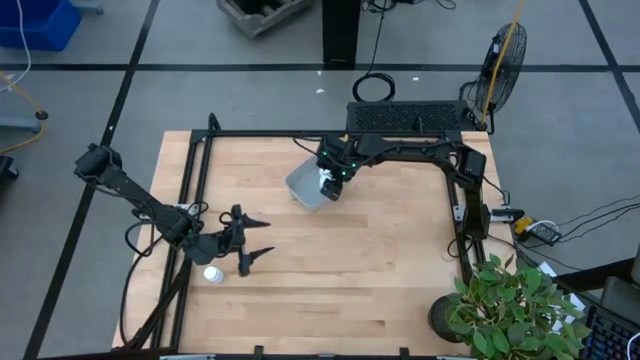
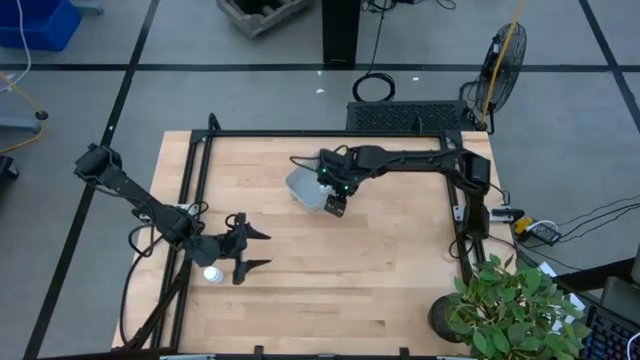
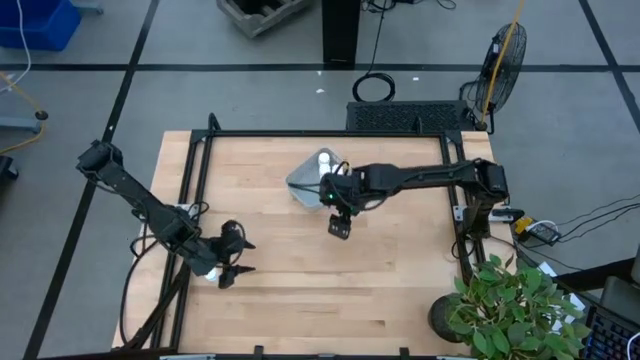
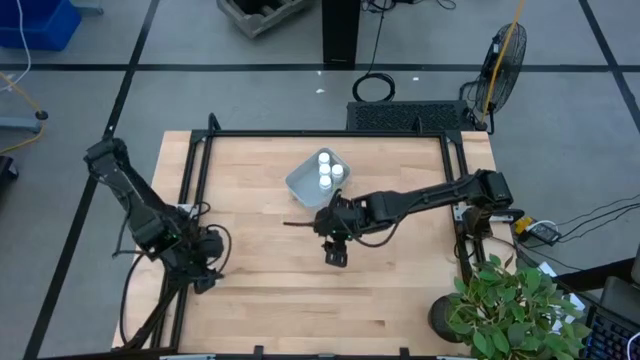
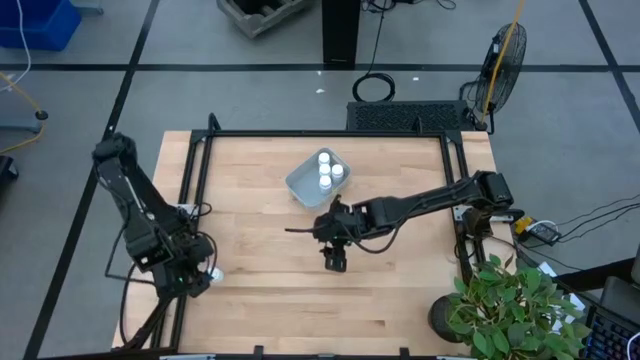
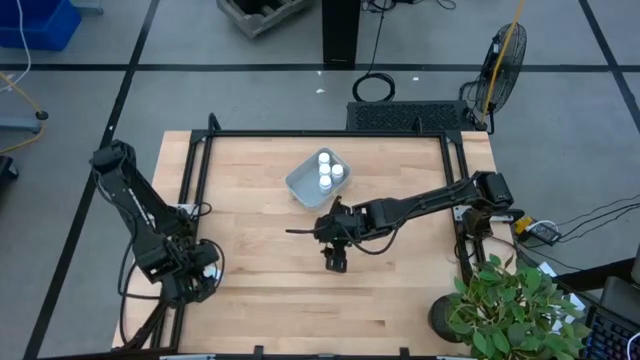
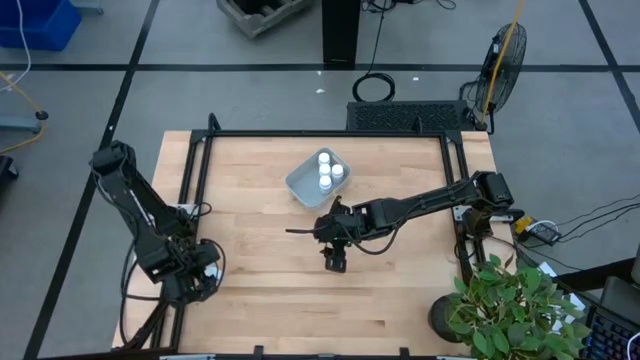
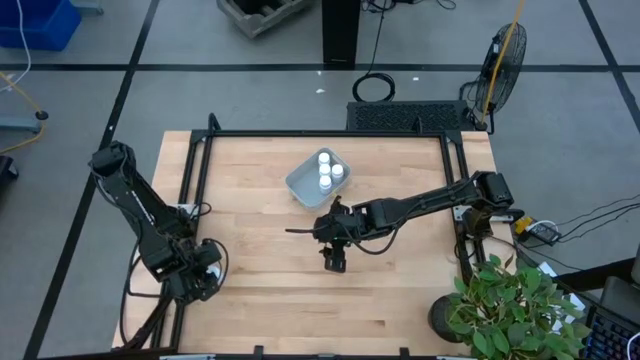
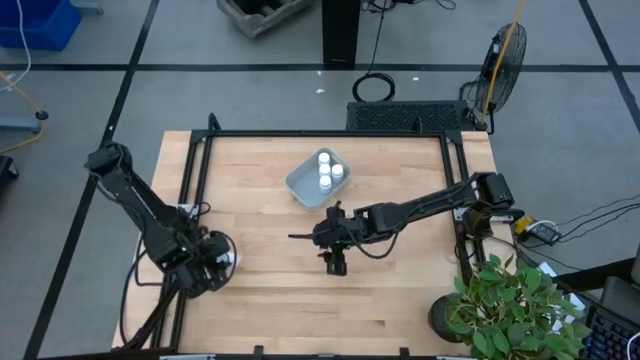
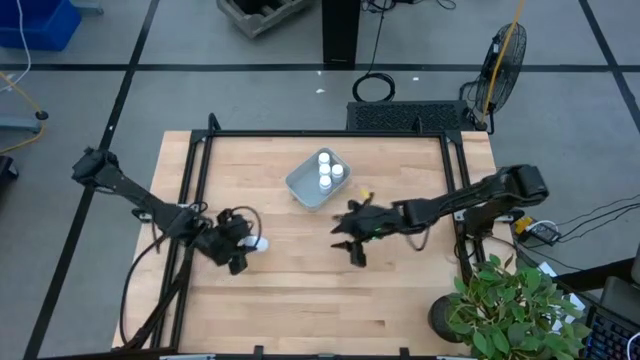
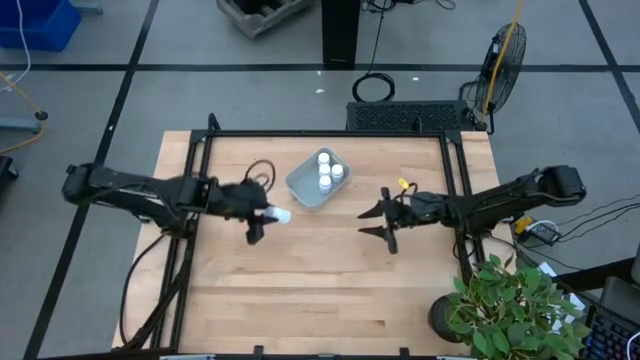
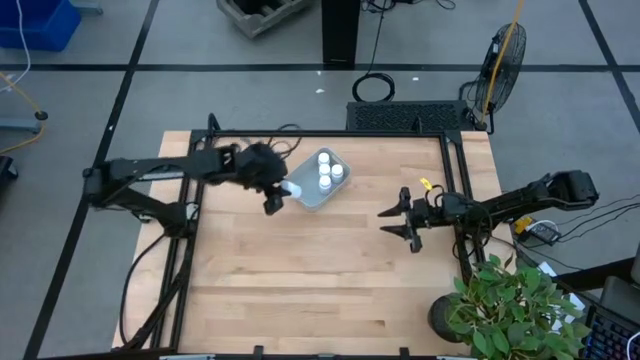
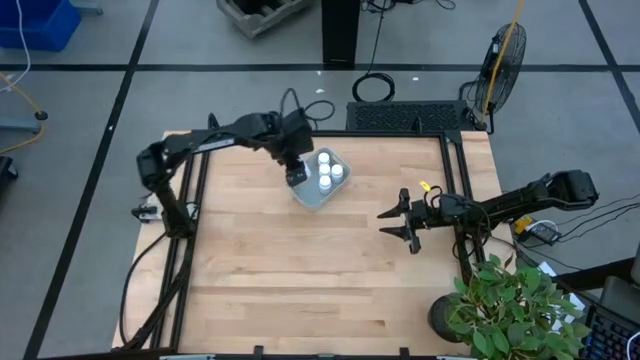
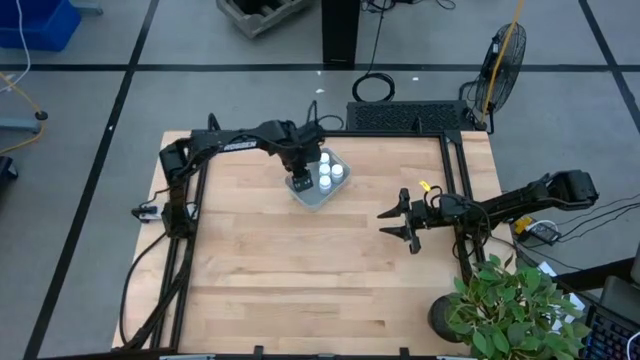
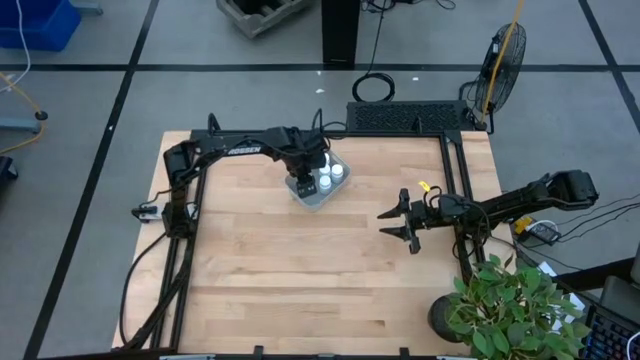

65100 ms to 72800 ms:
Task: Pick and place pill bottles into a basket
Put the white medicine bottle into the gray bin

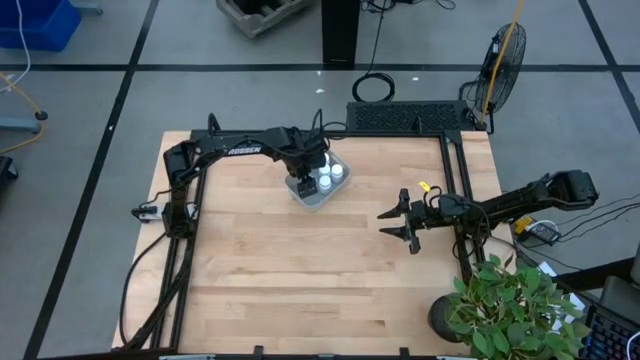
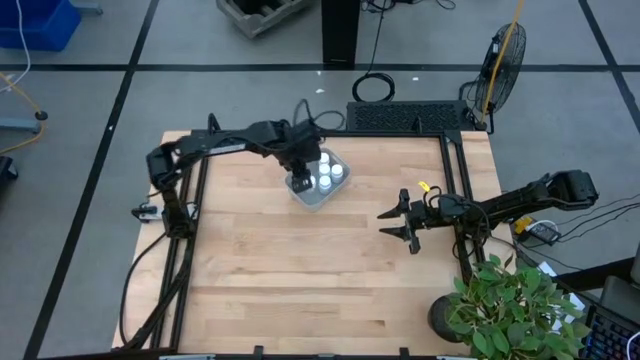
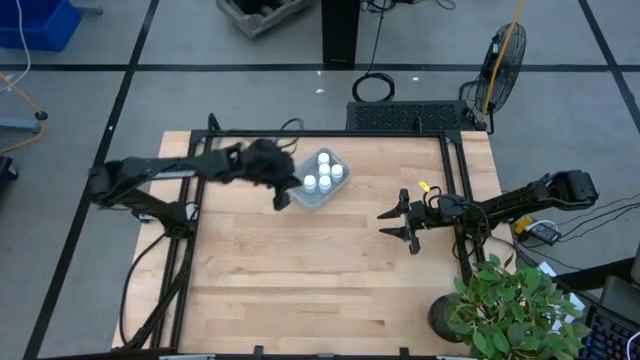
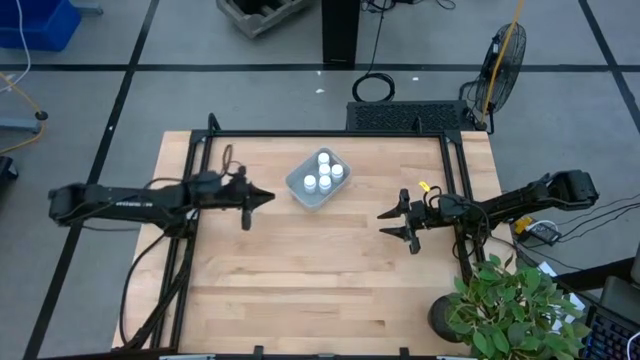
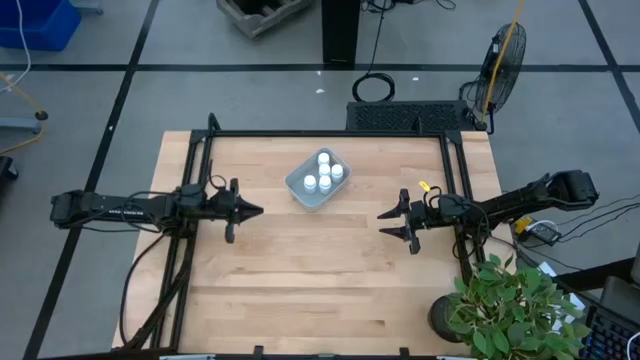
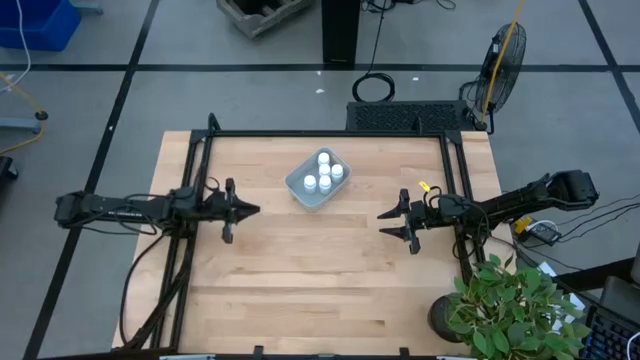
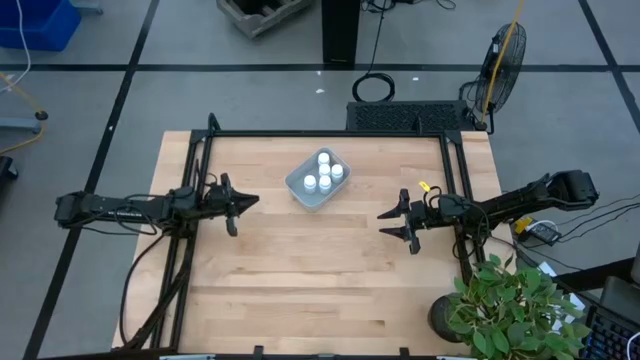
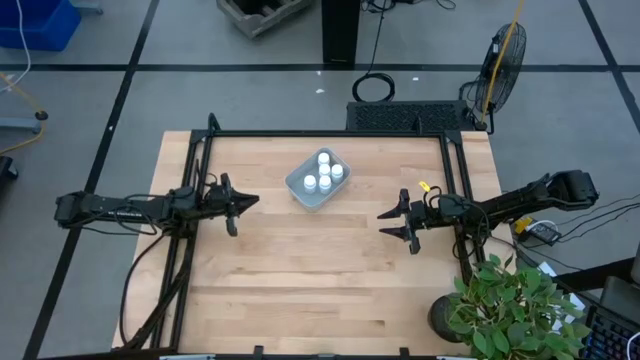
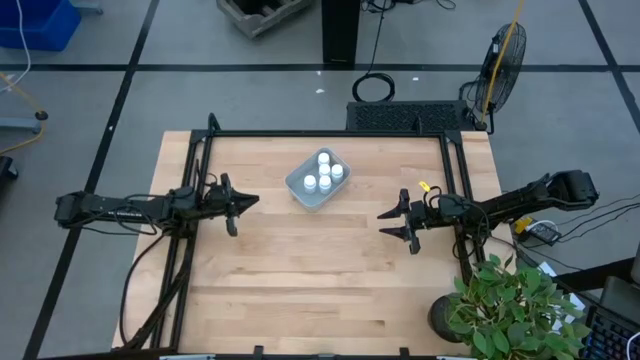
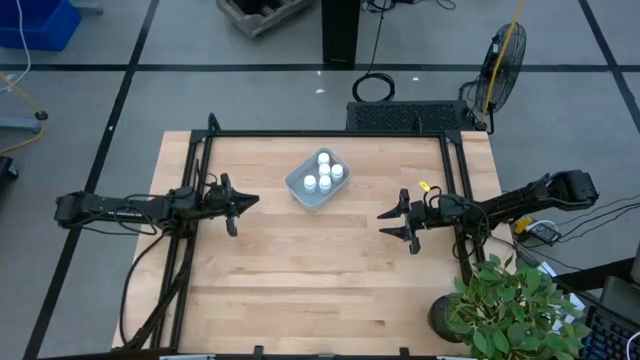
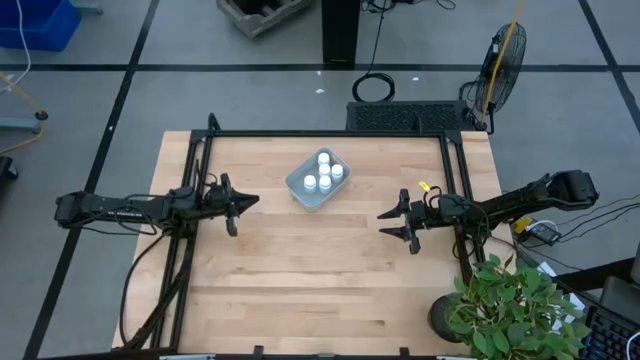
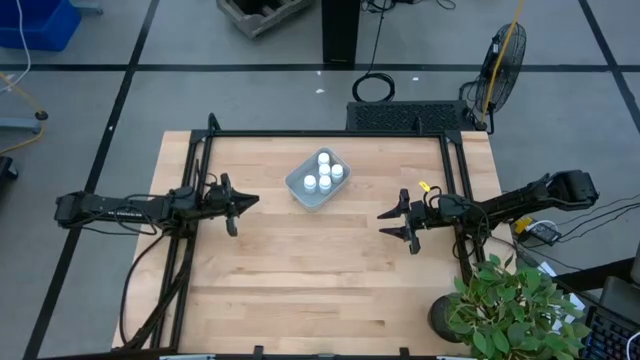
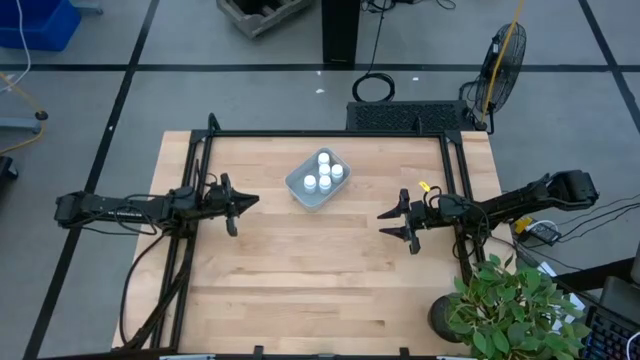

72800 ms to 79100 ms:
Return to Home Position

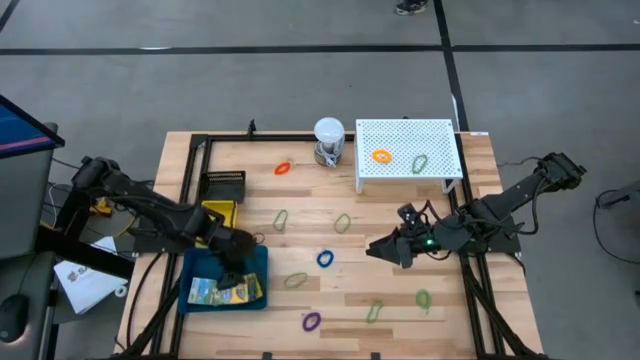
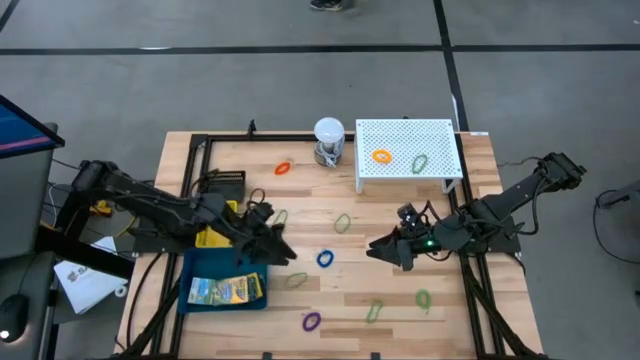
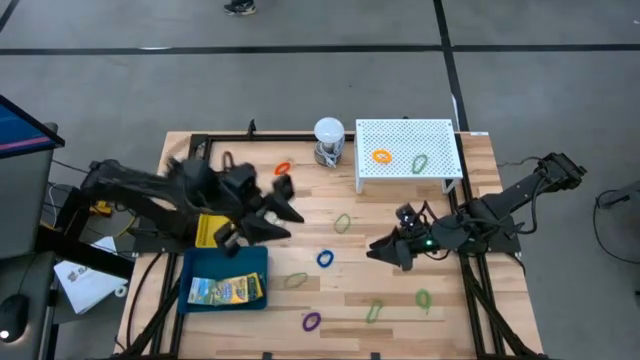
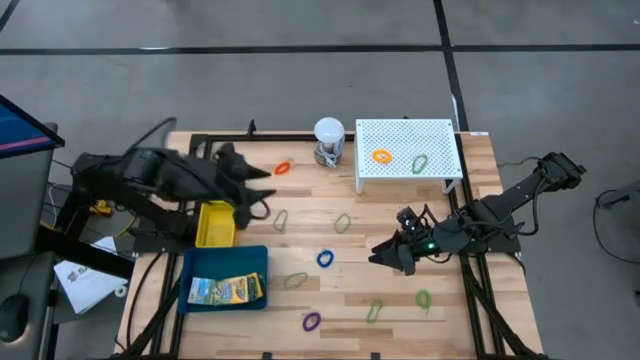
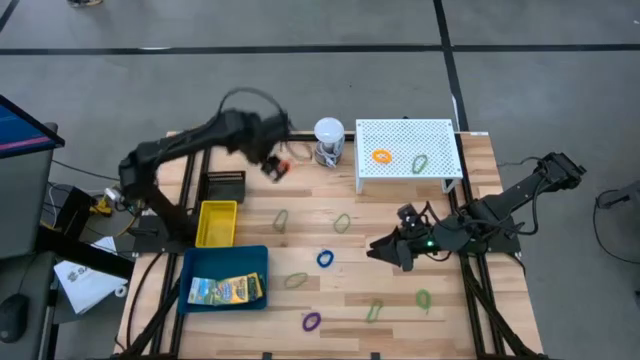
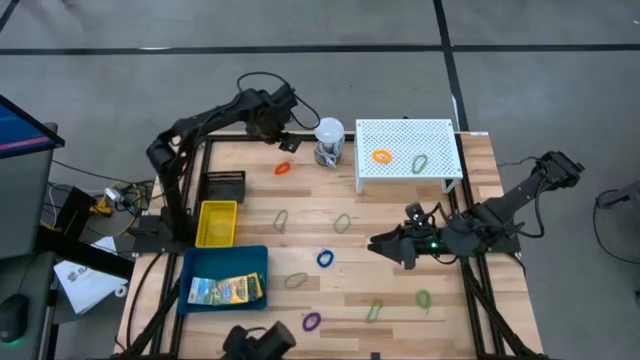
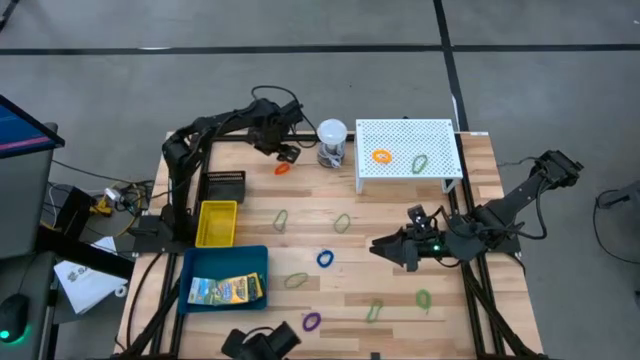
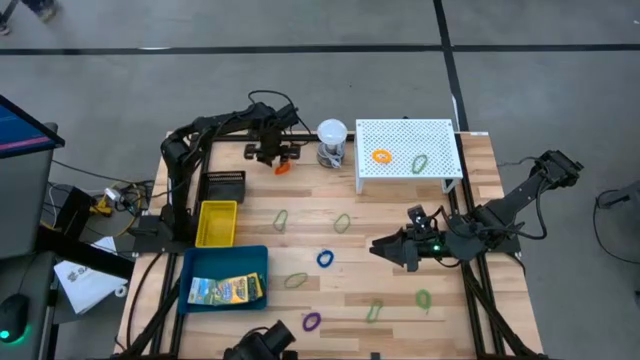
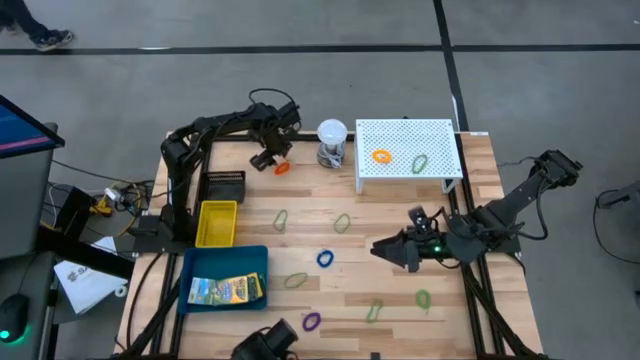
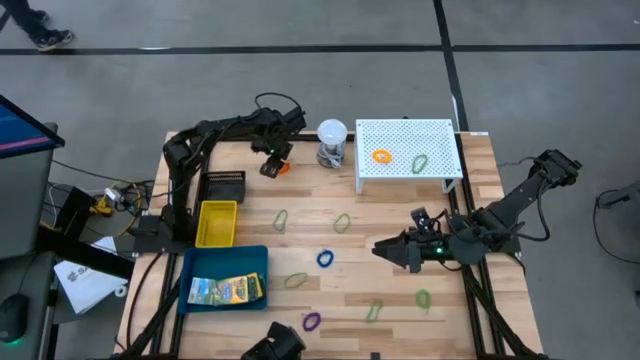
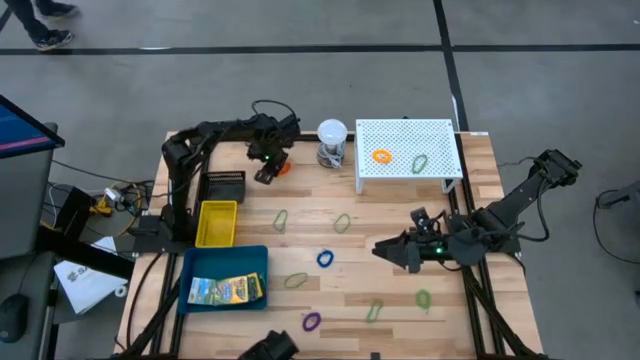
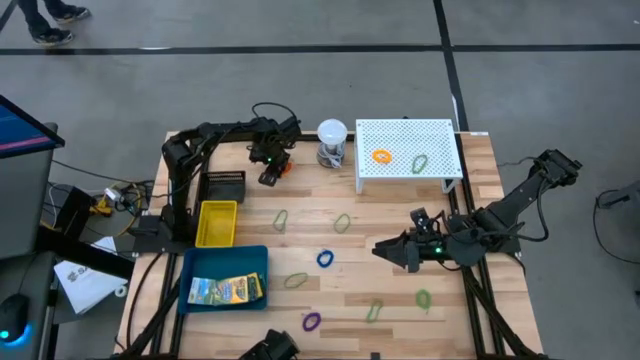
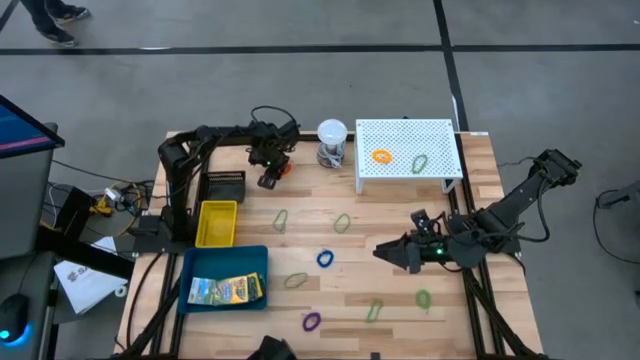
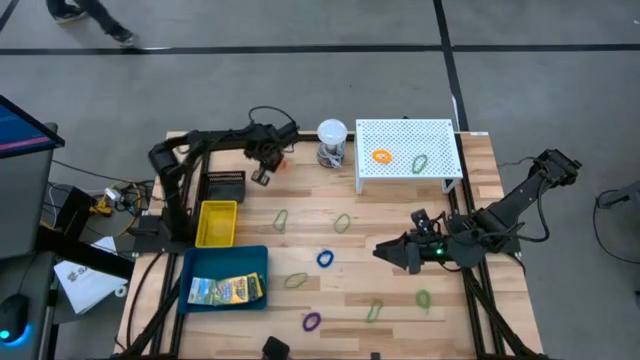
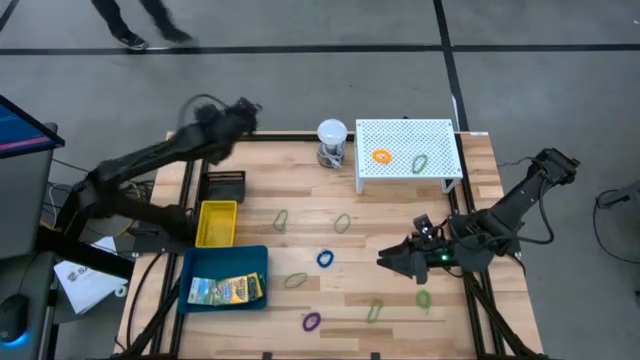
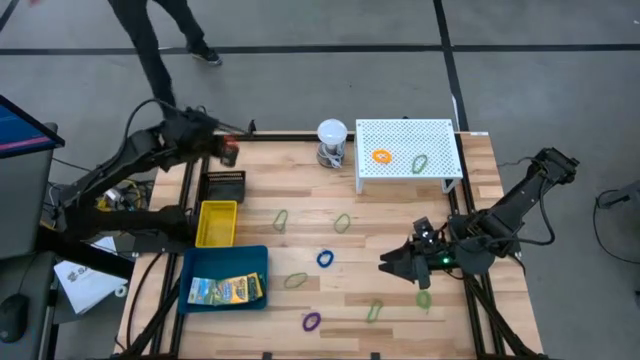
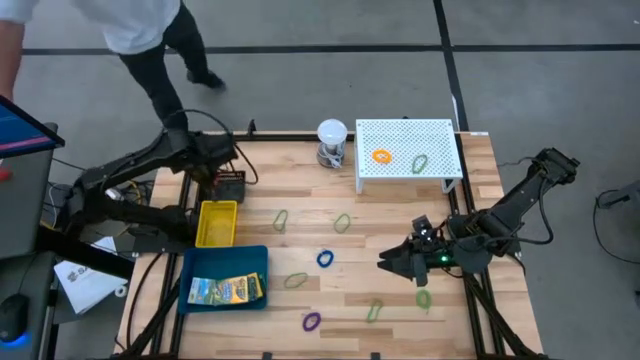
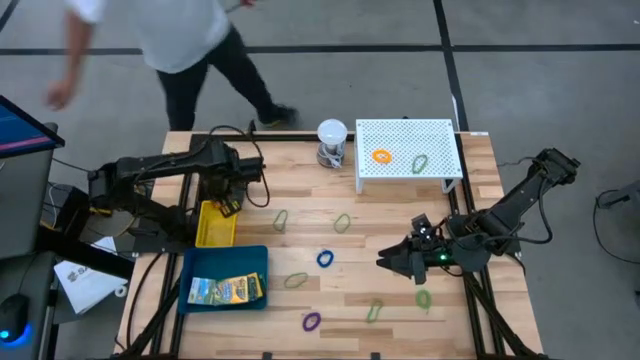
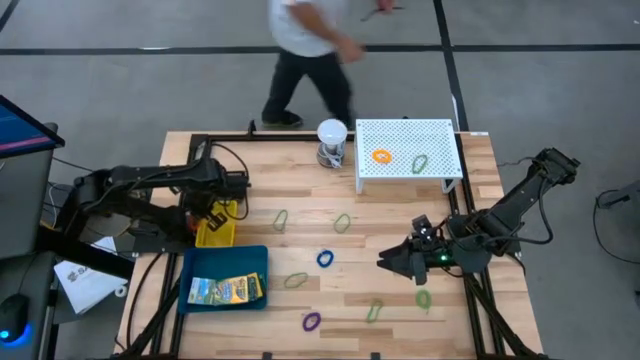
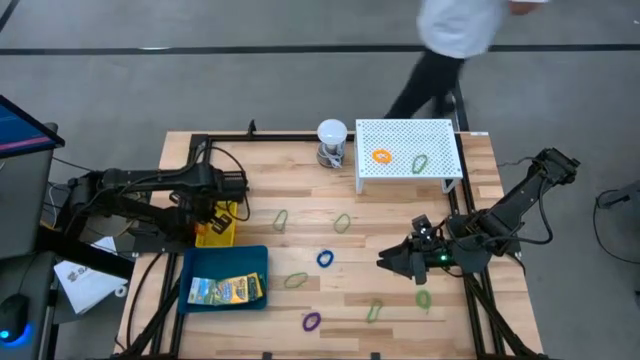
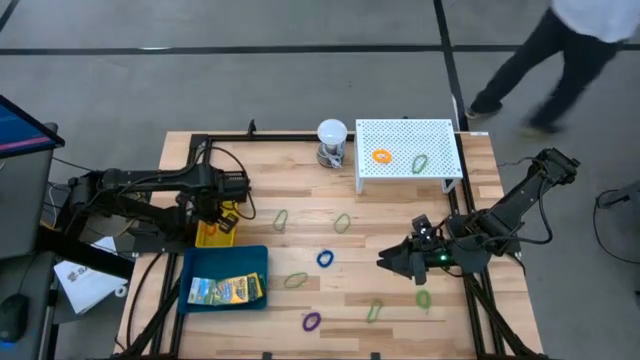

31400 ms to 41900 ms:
Task: Pick & Place Office Desk Supplies
Put the orange spring keychain into the yellow bin
